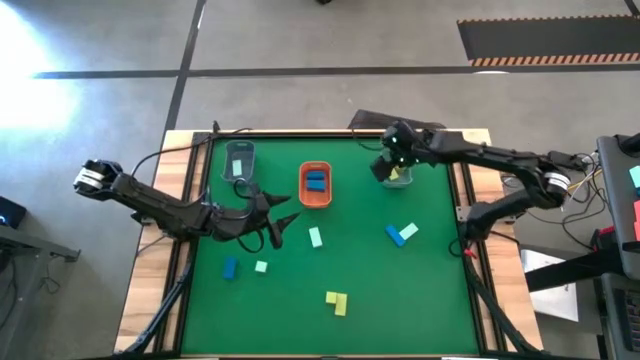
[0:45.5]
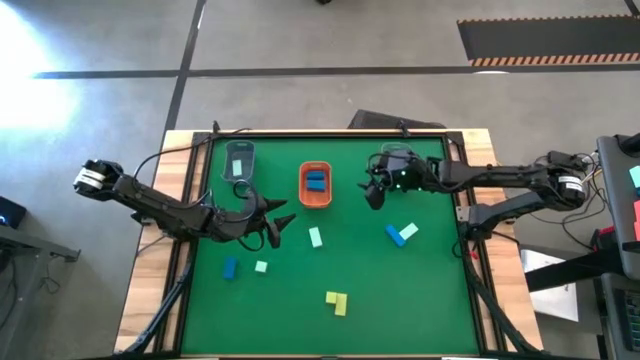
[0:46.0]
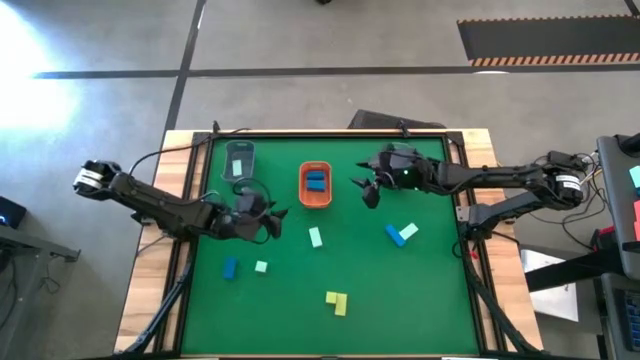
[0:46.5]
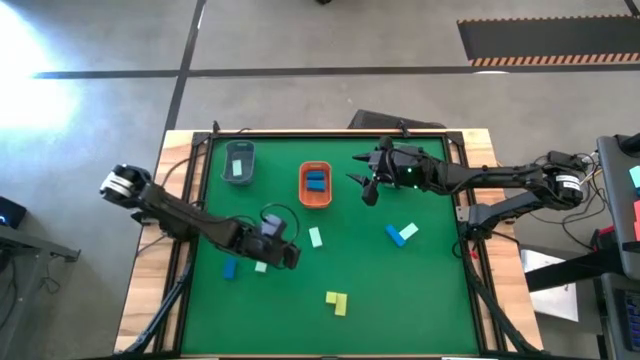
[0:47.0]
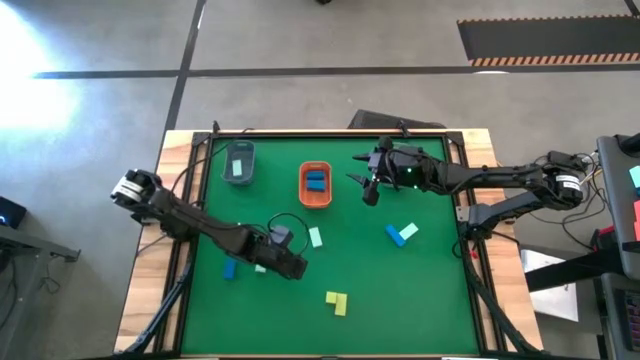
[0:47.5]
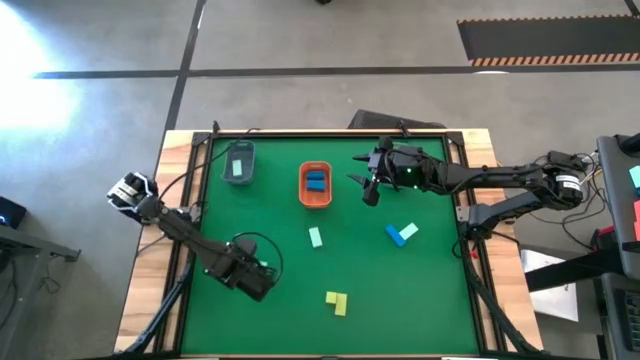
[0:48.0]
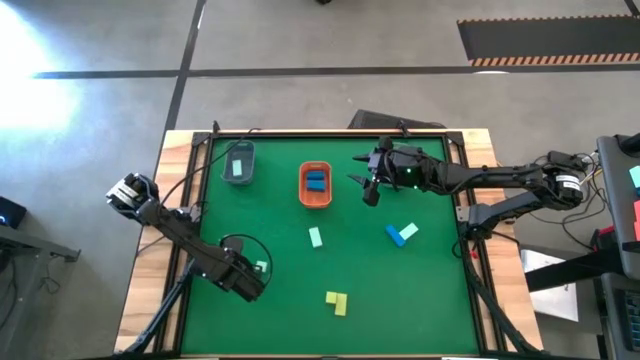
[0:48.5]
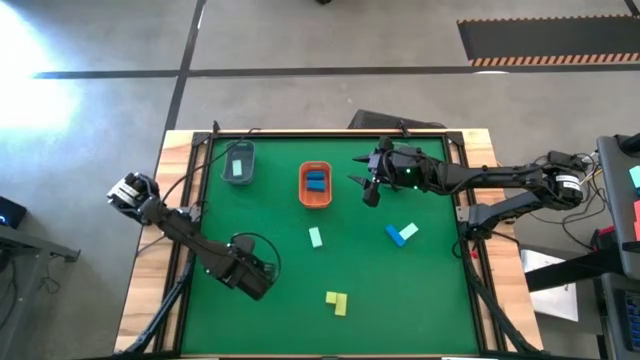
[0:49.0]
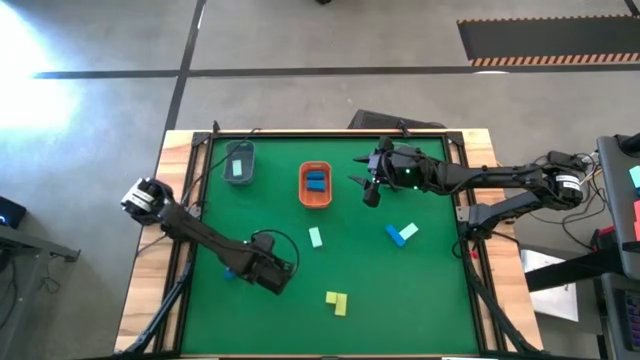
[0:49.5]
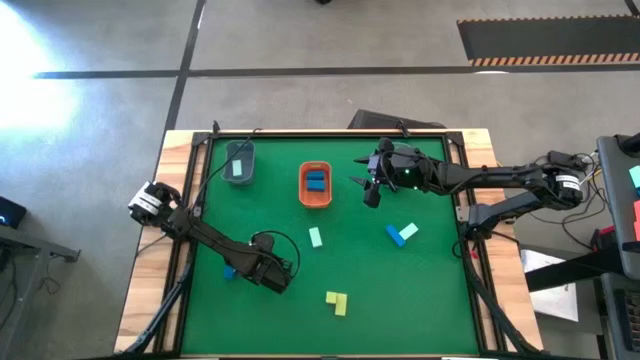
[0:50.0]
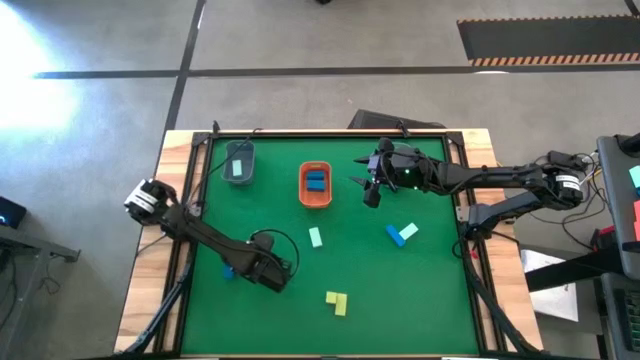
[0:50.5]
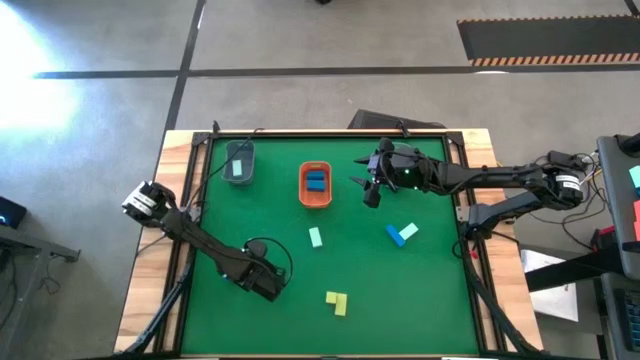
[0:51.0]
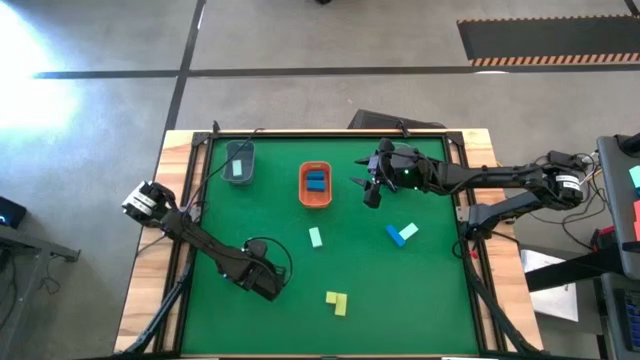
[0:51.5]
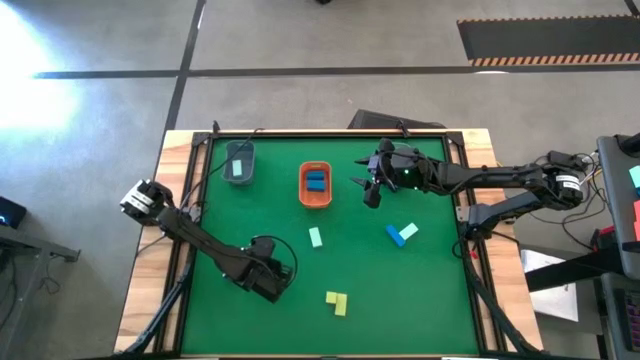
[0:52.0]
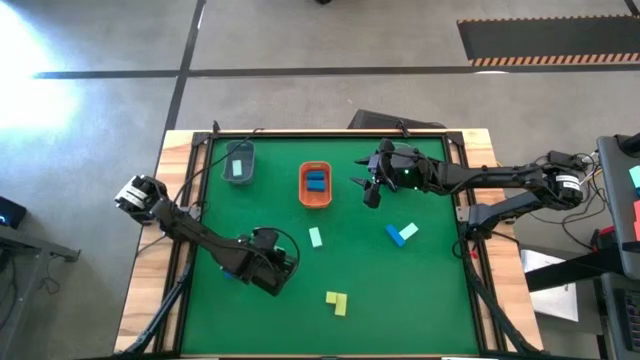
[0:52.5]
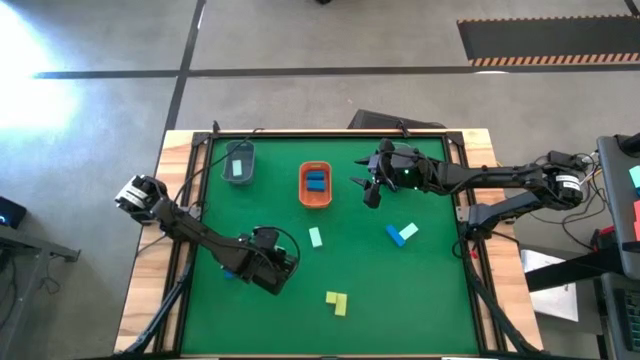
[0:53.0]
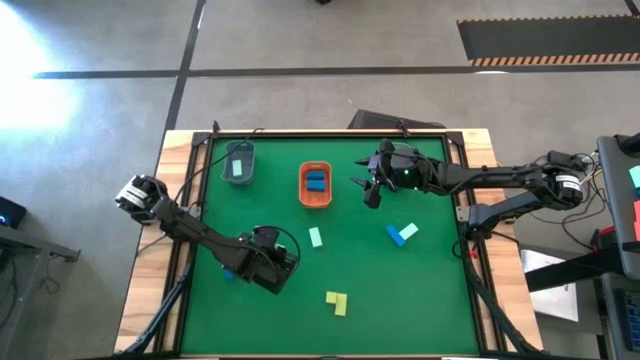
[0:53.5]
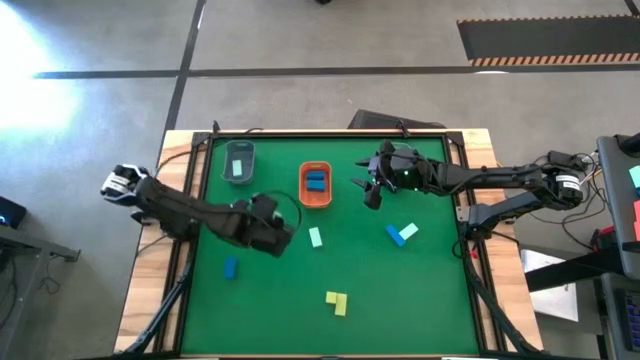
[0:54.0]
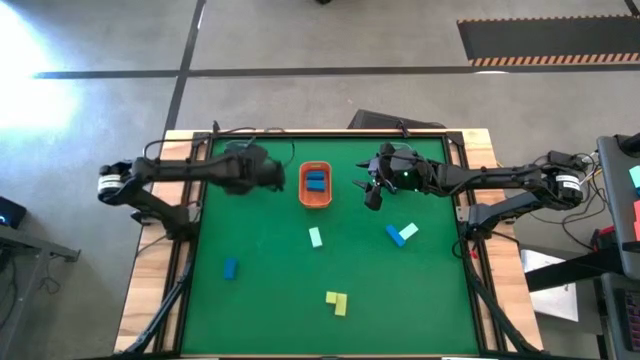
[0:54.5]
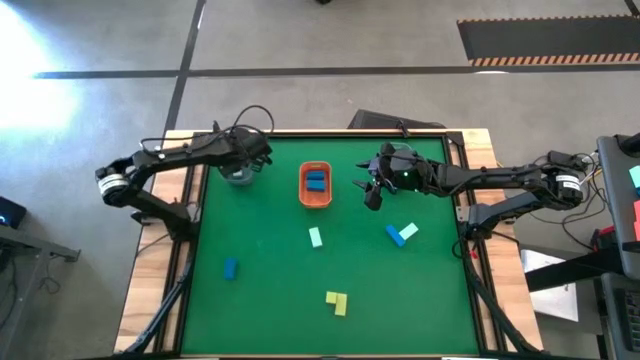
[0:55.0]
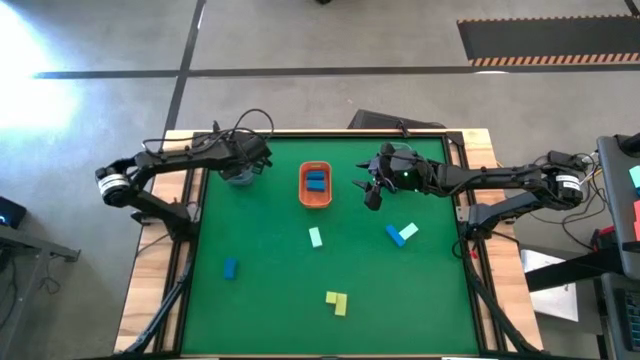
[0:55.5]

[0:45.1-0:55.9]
Task: Sort & place blocks by color
Put the light blue wooden block into the gray bin

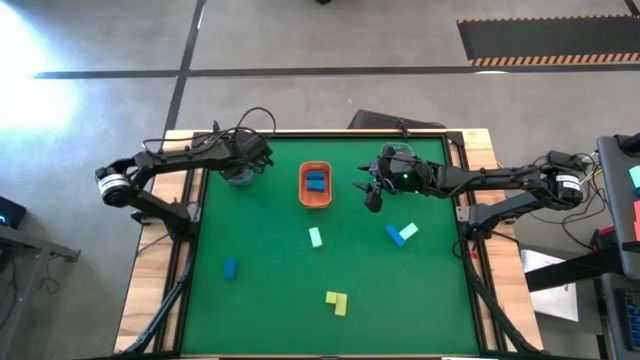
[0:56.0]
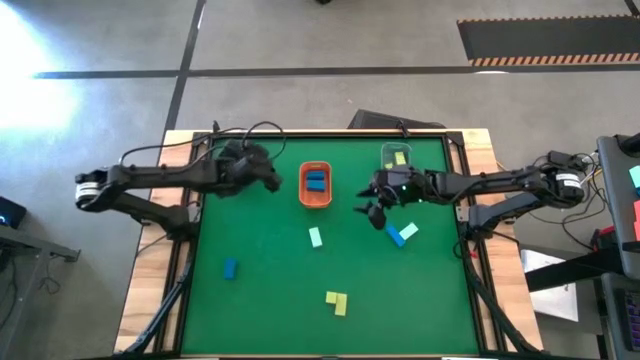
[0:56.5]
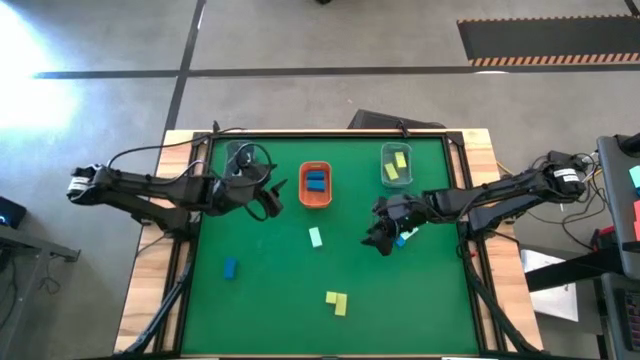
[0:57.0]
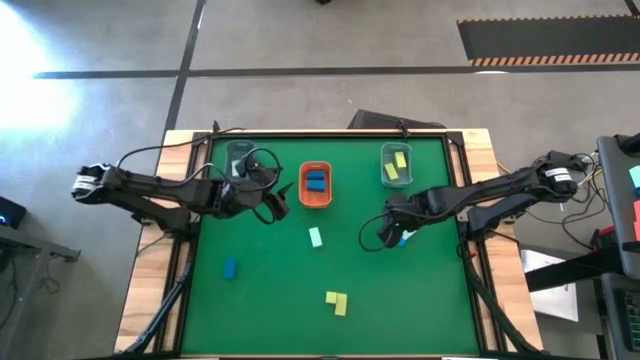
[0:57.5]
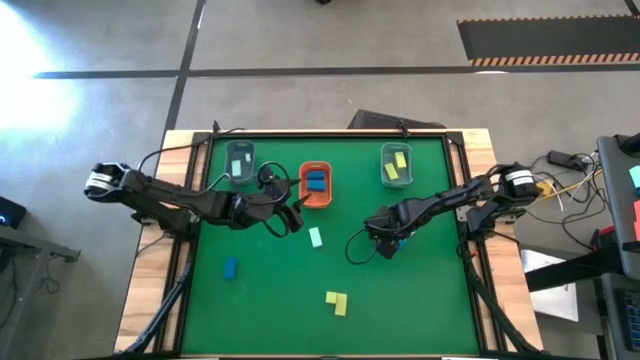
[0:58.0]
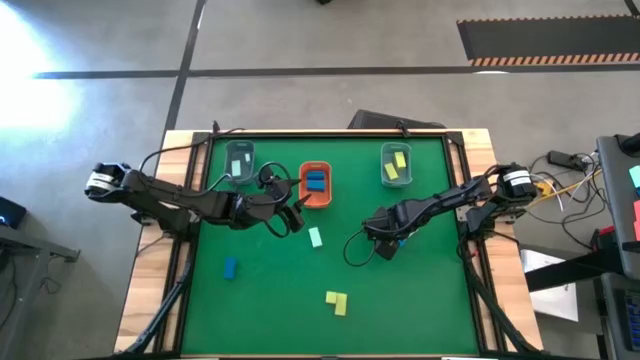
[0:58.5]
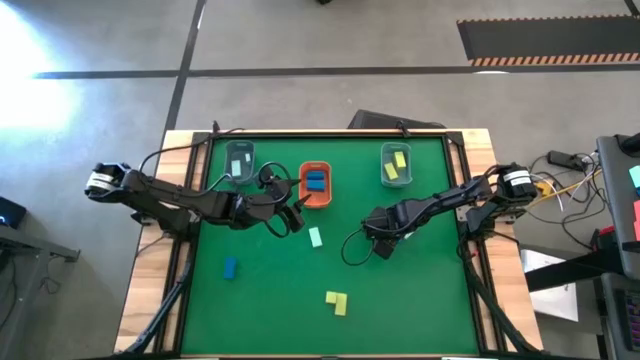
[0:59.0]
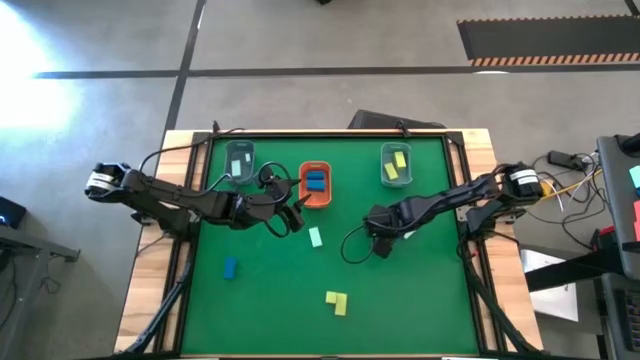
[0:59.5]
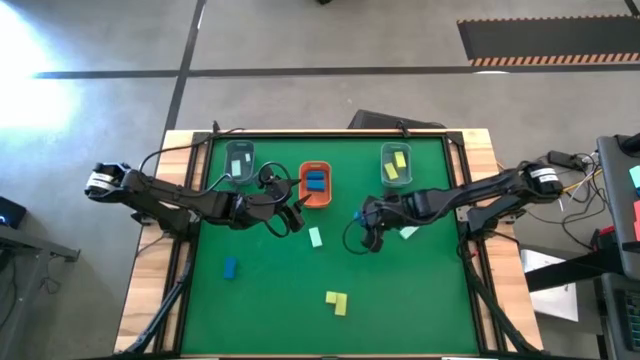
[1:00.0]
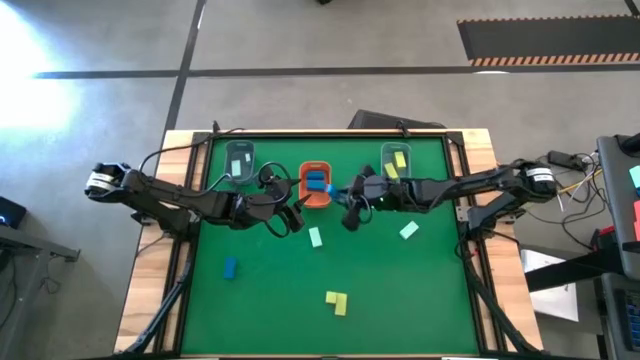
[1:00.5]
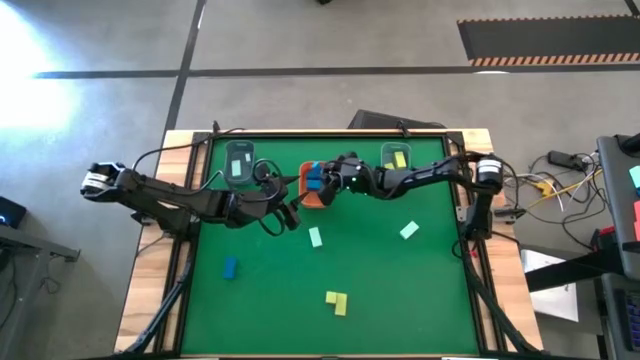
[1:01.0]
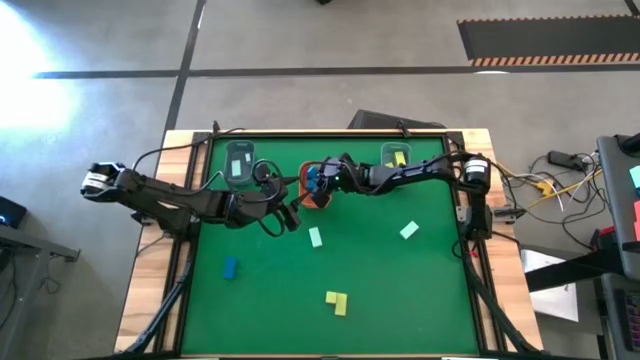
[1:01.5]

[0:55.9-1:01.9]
Put the dark blue wooden block into the orange bin

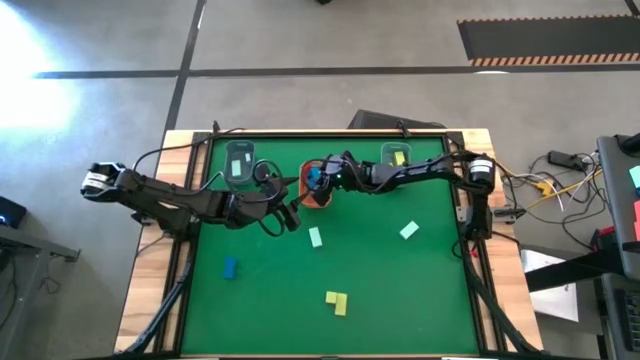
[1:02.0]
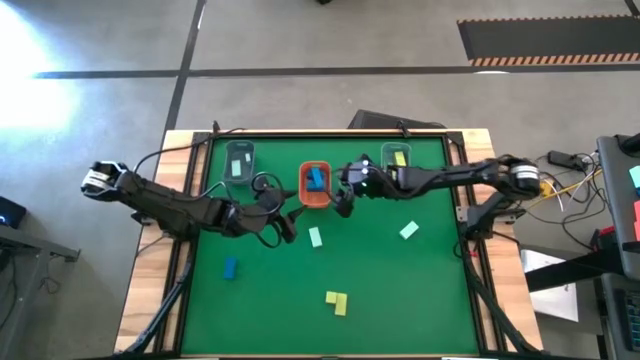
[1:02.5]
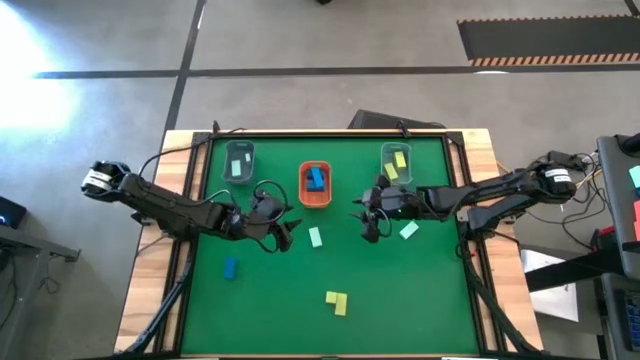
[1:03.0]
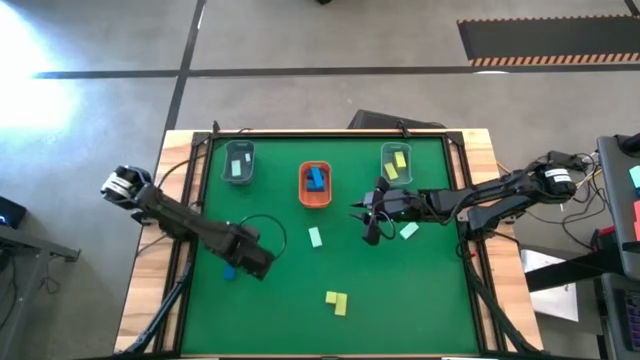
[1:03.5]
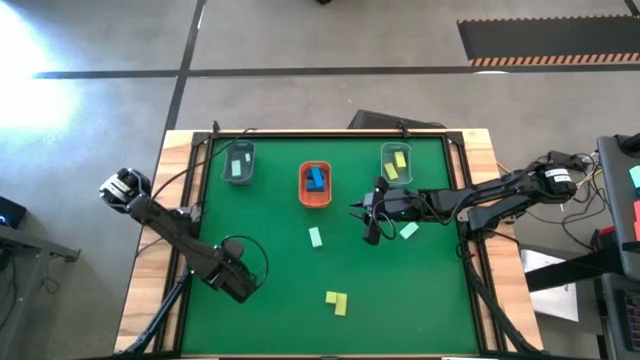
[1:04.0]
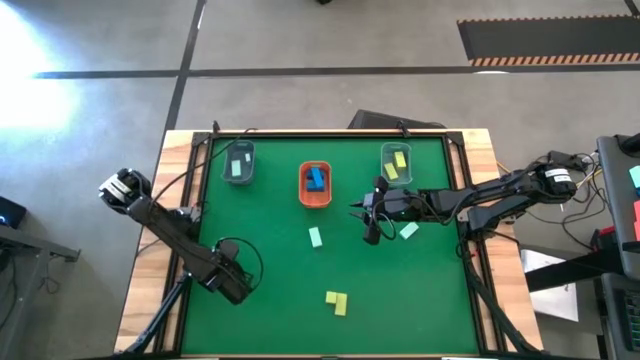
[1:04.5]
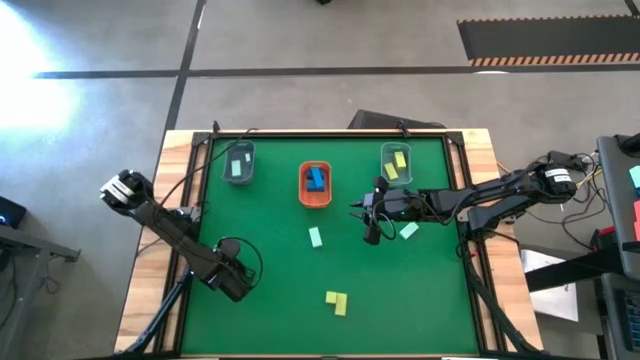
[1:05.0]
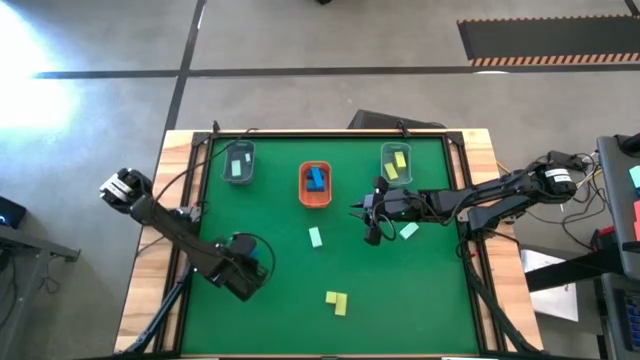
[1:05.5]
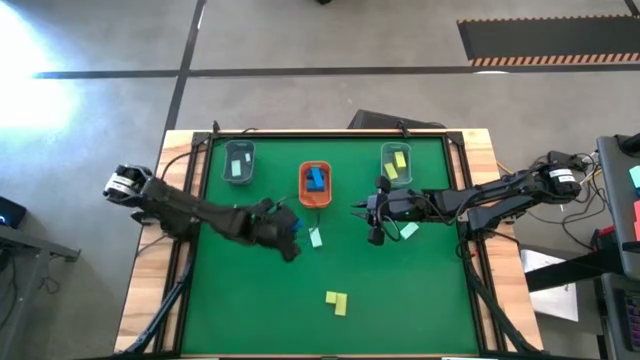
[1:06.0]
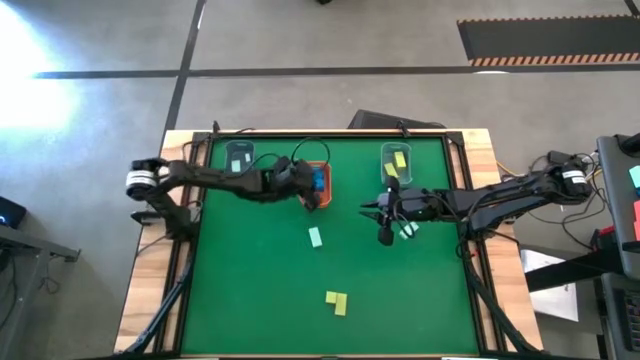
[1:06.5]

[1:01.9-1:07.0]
Put the dark blue wooden block into the orange bin
